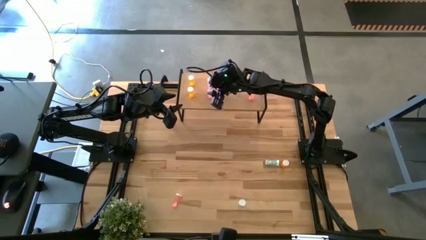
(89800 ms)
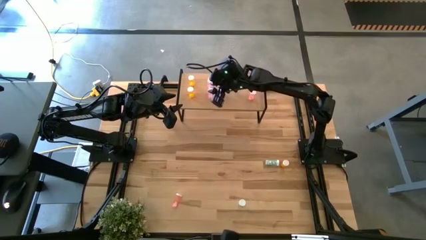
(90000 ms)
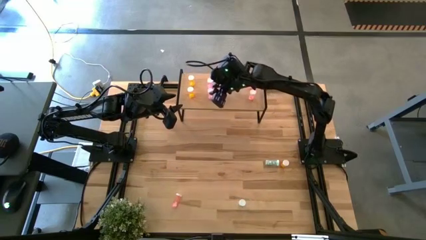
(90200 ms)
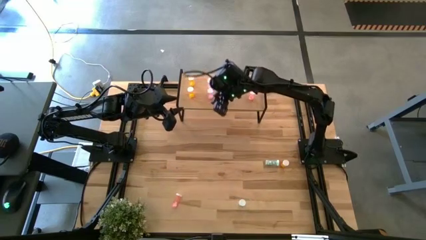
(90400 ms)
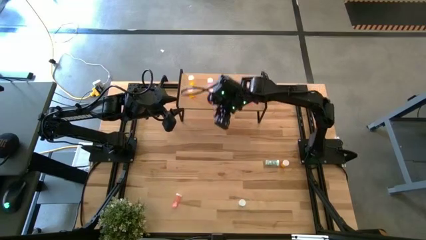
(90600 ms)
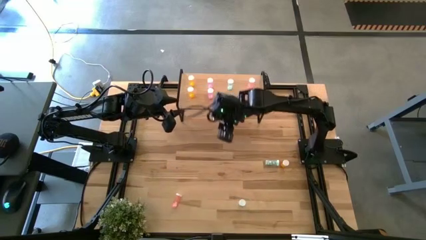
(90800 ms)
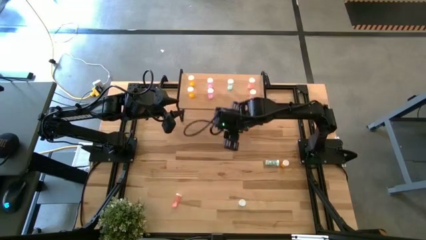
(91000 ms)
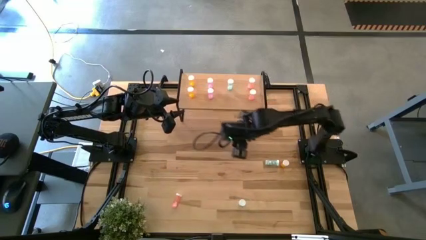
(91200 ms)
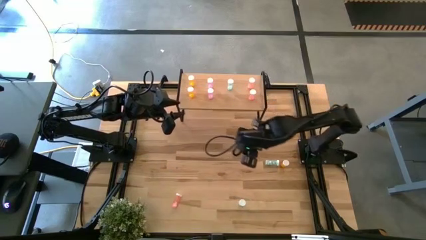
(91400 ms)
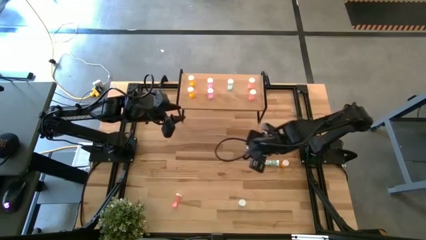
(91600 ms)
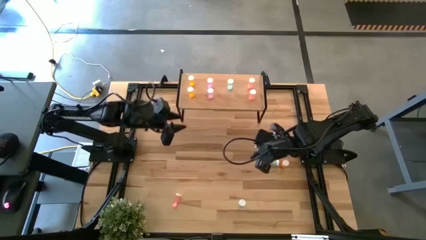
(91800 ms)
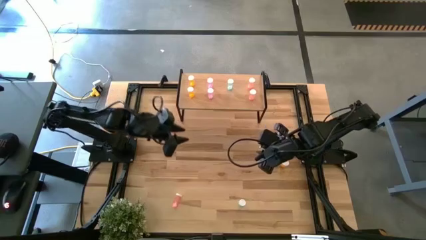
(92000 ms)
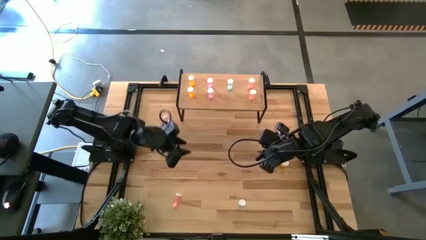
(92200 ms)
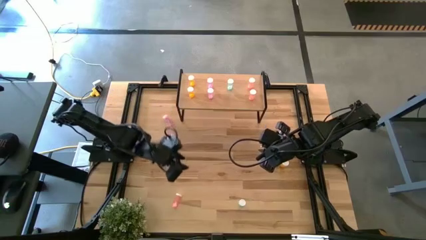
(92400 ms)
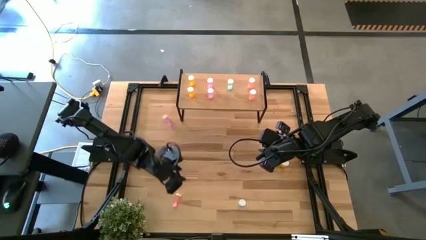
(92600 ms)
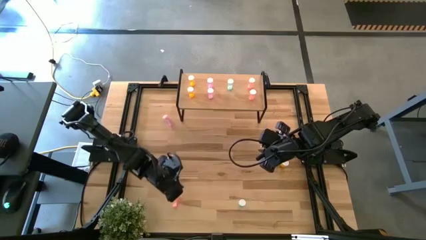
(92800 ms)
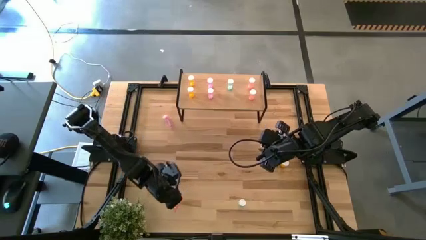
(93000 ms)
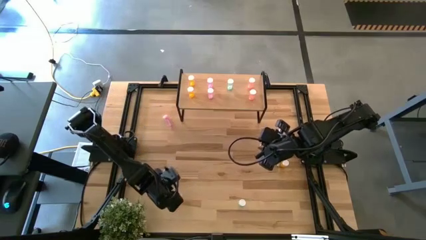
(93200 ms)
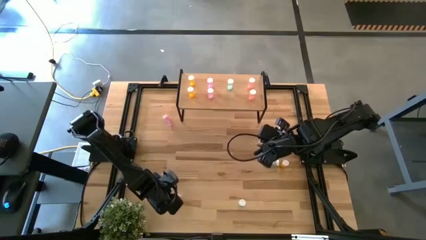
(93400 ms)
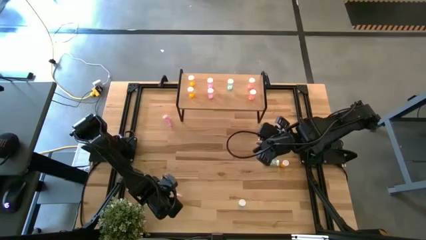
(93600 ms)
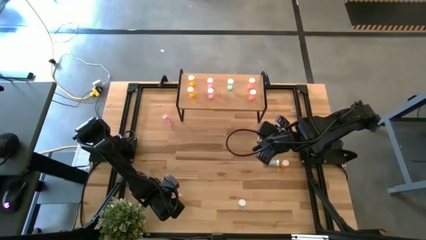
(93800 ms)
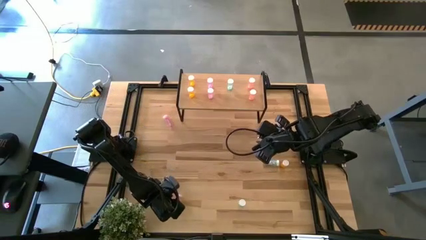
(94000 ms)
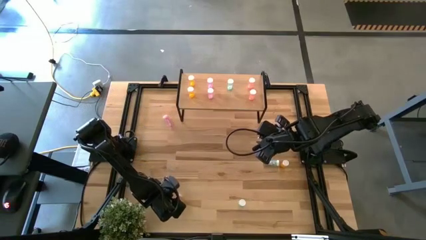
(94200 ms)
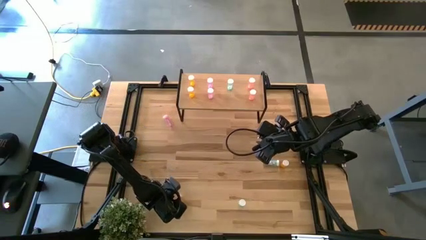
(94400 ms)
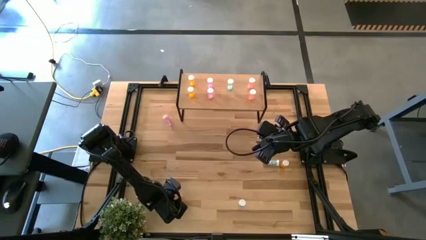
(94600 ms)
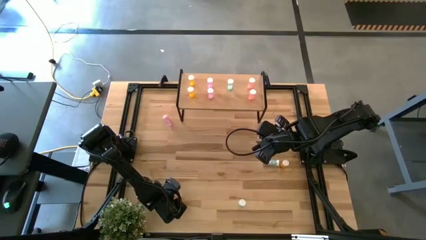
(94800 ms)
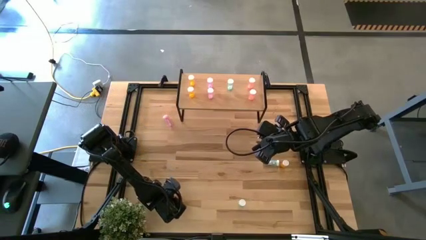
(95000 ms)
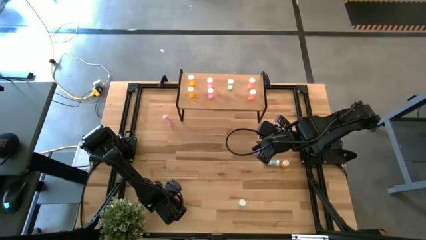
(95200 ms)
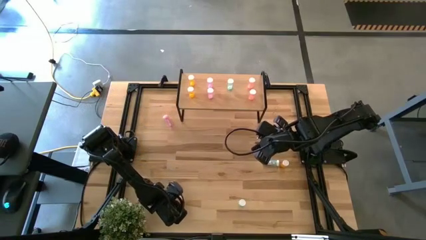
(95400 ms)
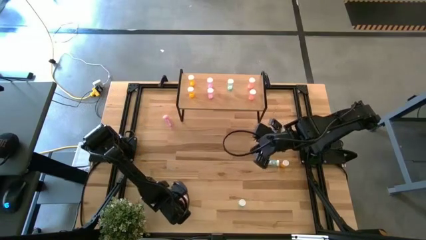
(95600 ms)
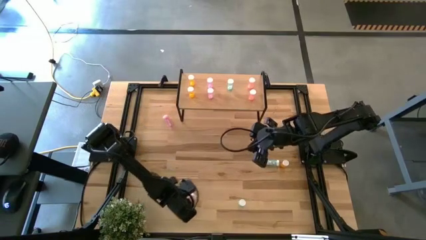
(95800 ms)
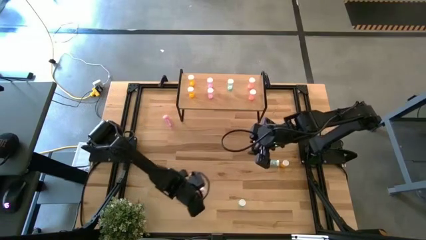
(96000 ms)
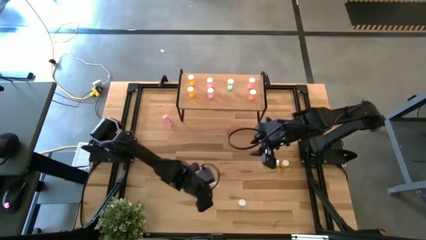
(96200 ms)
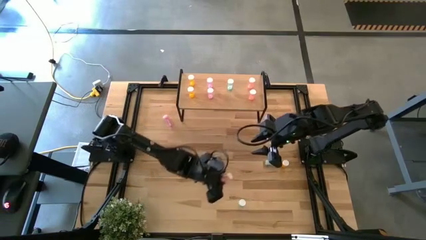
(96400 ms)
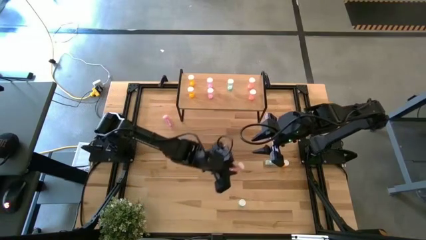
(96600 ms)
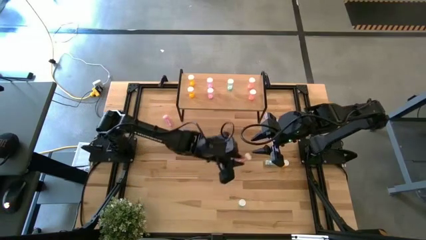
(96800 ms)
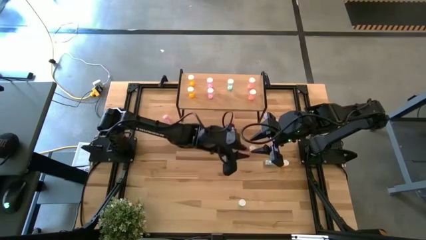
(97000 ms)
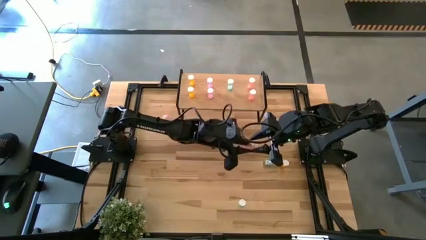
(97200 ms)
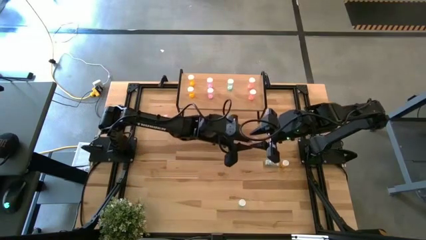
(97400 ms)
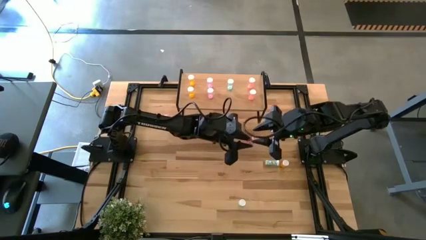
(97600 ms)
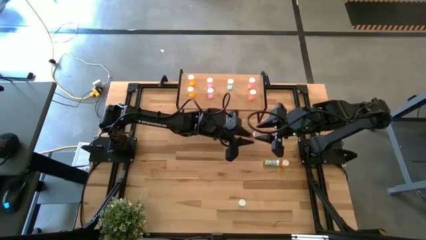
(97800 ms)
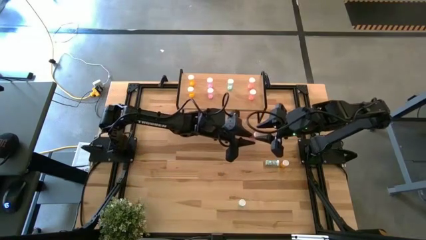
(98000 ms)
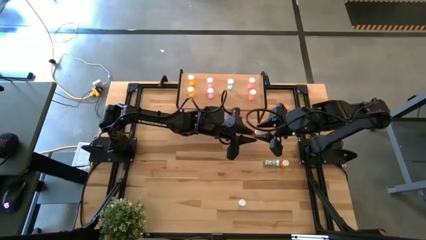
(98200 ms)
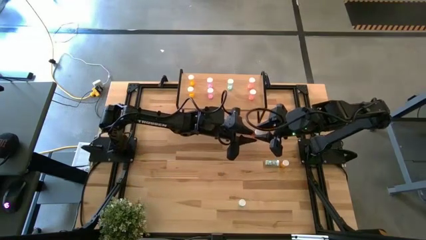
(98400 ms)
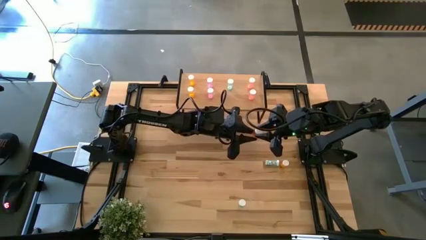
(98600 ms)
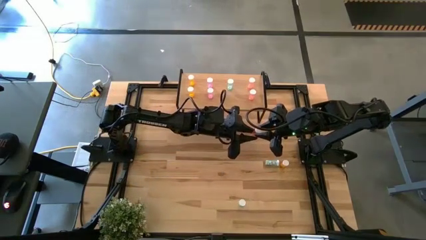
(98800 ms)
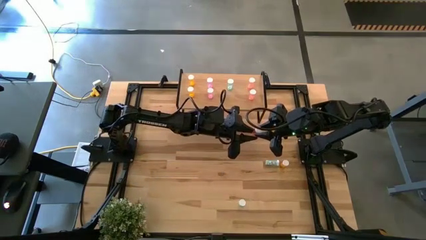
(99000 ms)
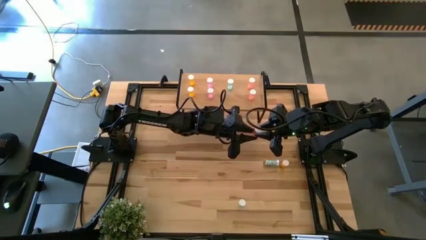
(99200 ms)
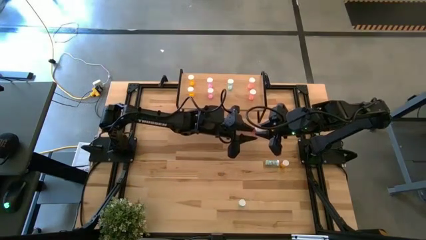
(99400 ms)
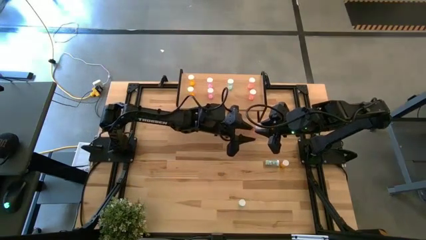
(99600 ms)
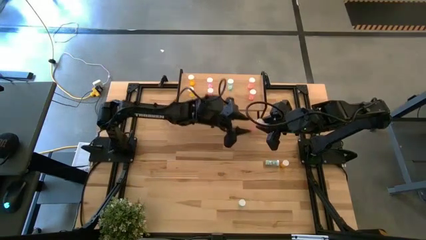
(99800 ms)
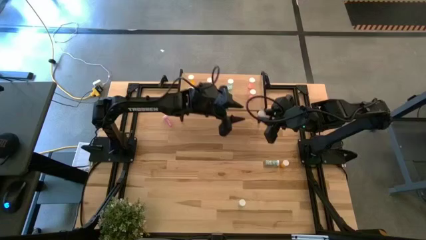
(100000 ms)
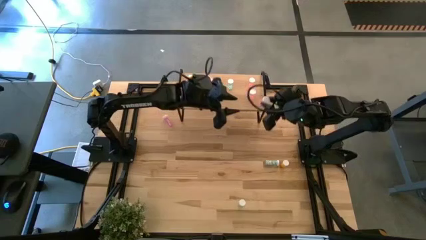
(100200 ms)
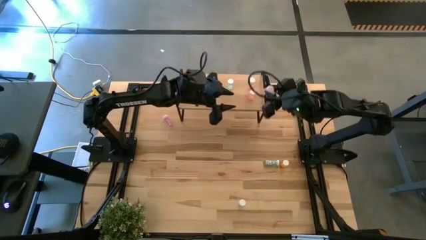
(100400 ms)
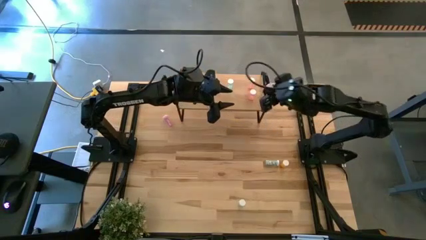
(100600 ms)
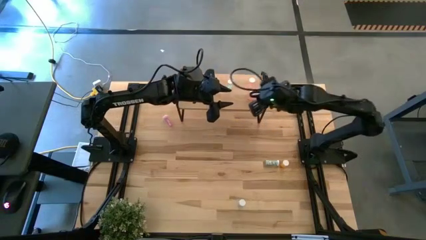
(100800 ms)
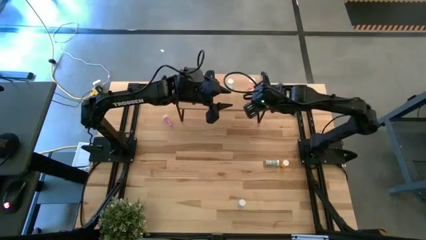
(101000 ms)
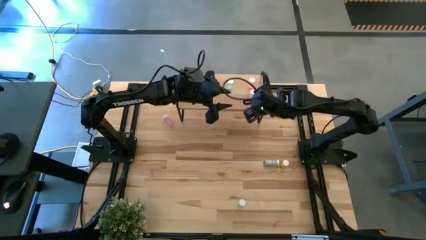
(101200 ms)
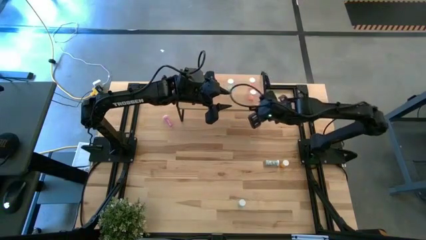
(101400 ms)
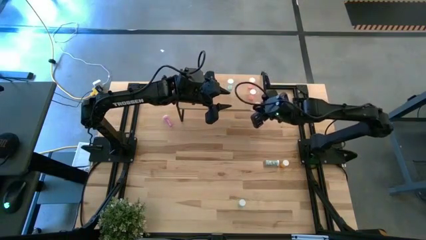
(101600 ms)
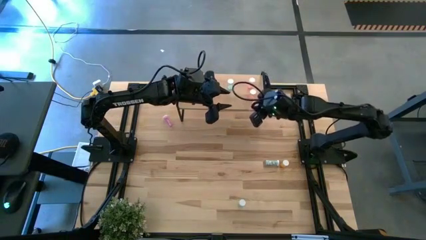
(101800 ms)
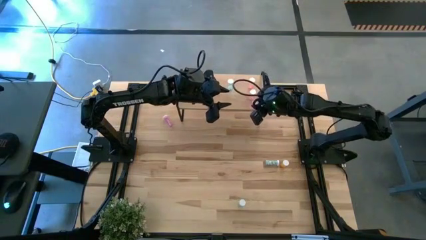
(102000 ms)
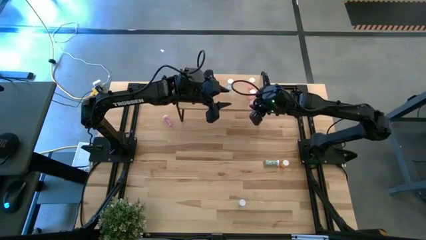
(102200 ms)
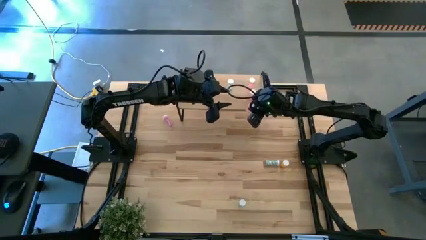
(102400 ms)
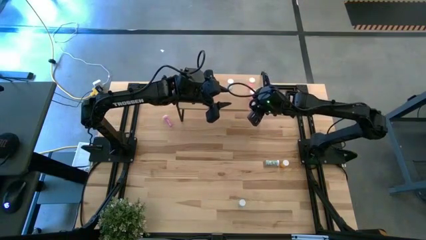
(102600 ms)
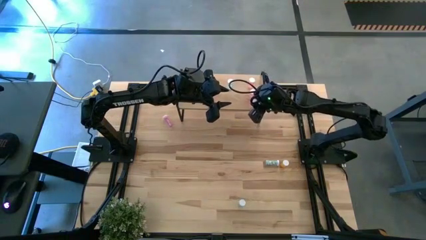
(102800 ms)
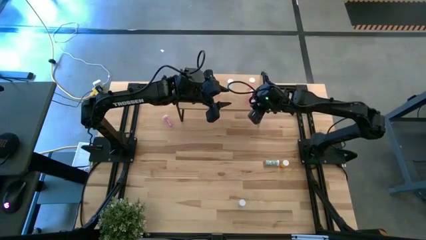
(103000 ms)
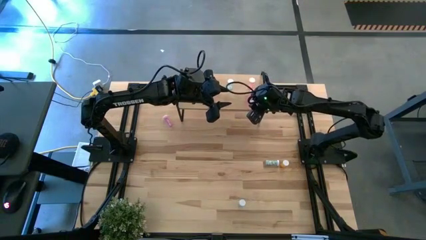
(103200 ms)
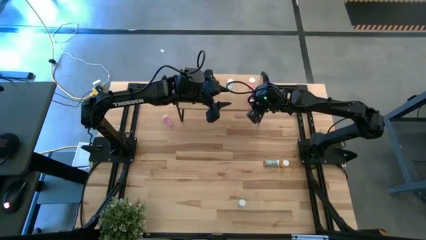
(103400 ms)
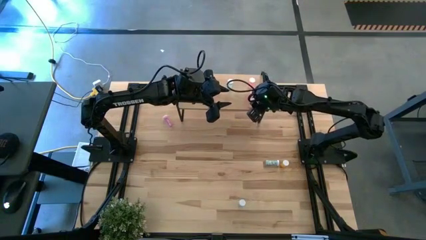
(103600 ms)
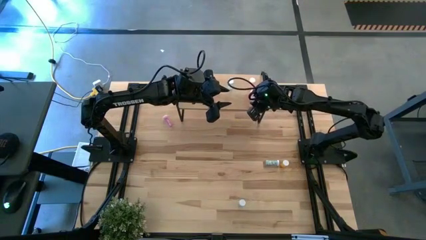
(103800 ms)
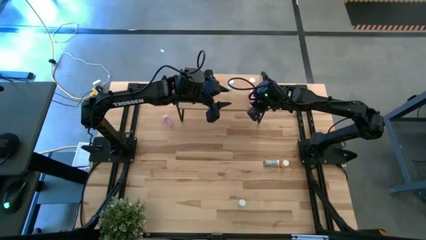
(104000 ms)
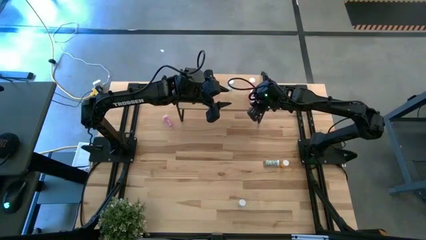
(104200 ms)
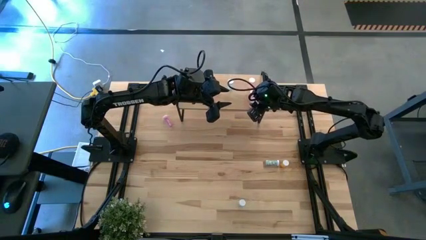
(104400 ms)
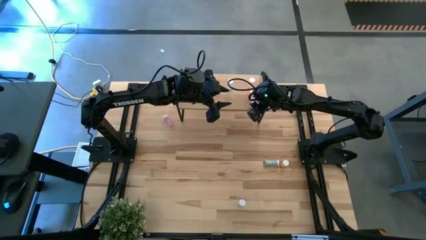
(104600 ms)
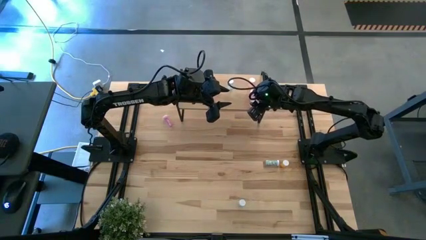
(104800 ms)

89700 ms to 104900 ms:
Task: Pick and place medicine bottles onto shelf by color
Put the pink medicine bottle on the shelf aligned with the other pink medicine bottles

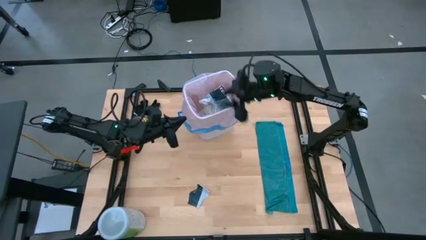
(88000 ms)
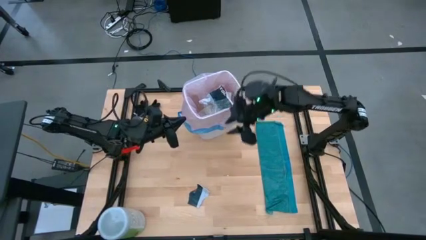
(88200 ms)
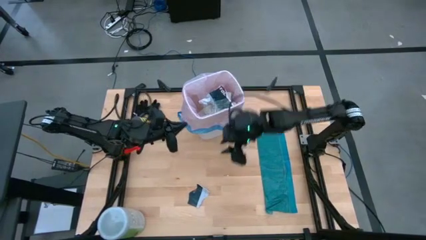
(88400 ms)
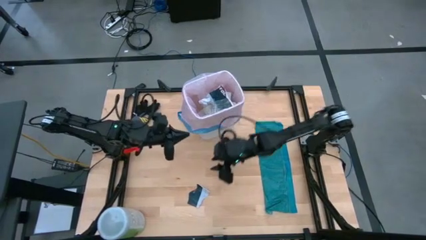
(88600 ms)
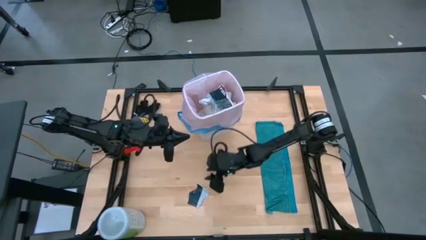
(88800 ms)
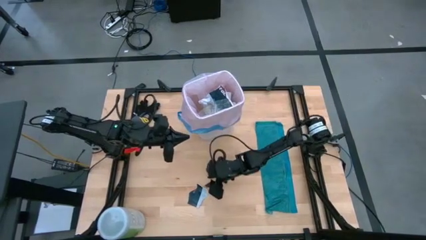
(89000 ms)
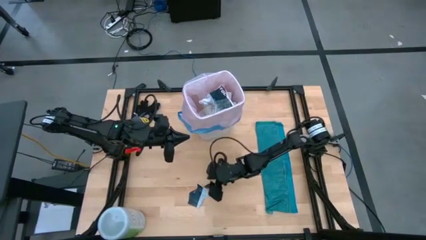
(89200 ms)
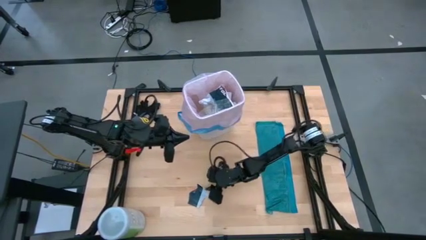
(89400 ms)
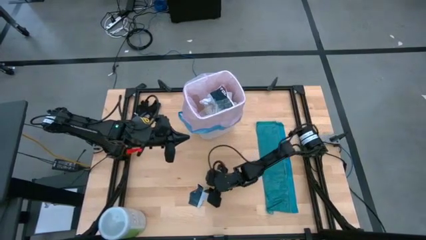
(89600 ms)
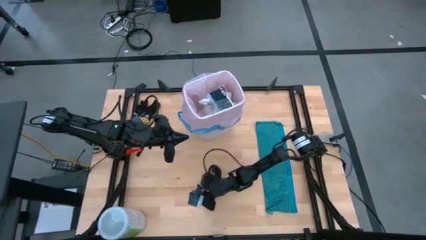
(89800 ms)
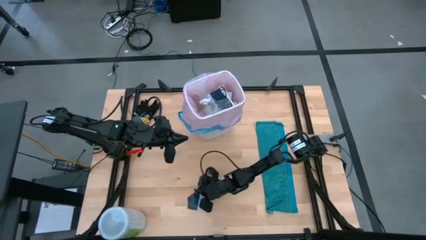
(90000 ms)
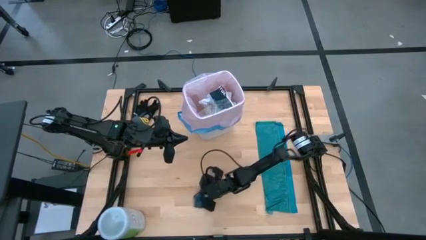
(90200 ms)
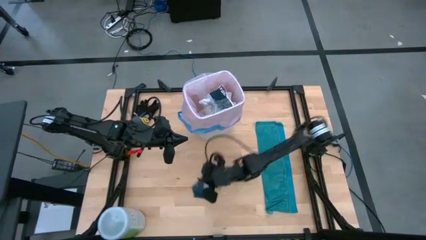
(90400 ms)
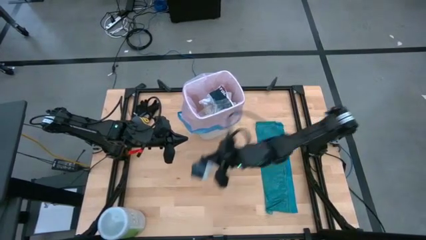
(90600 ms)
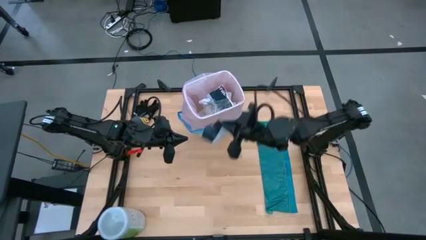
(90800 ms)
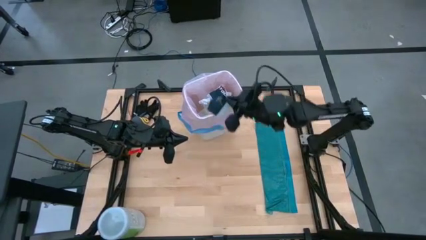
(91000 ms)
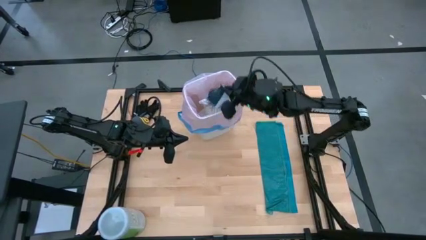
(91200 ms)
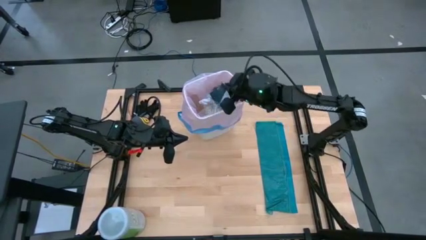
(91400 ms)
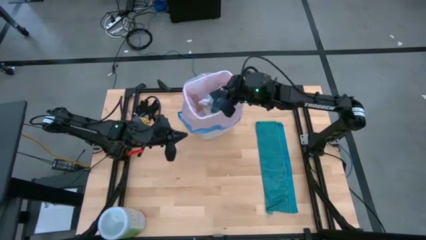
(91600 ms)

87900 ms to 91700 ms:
Task: place trash/remove bag and relplace
Put the black paper into the white trash bin
